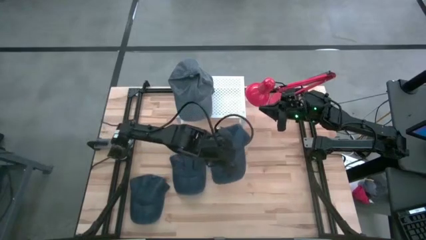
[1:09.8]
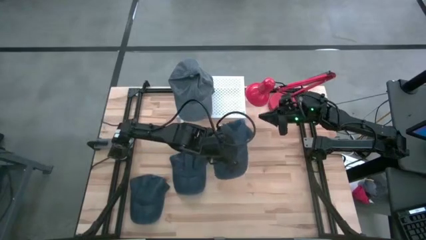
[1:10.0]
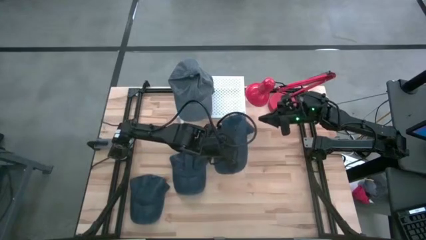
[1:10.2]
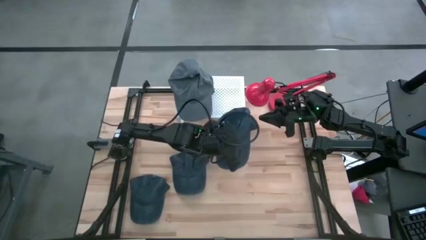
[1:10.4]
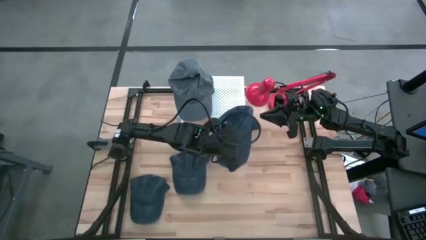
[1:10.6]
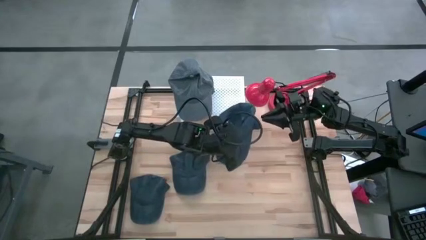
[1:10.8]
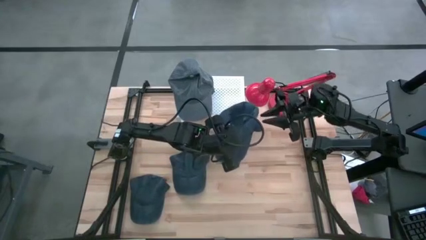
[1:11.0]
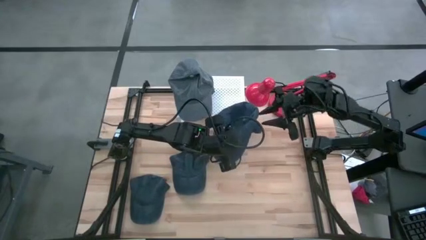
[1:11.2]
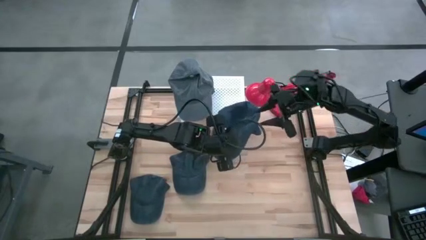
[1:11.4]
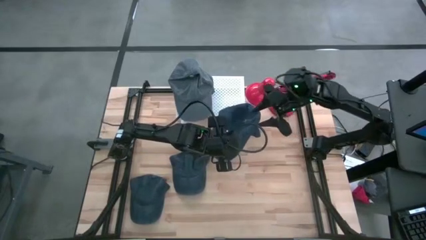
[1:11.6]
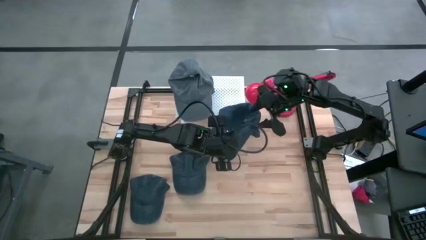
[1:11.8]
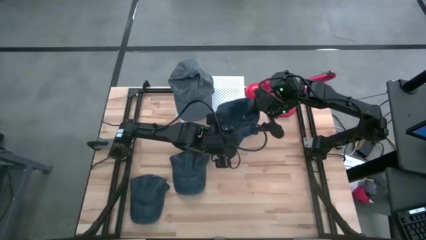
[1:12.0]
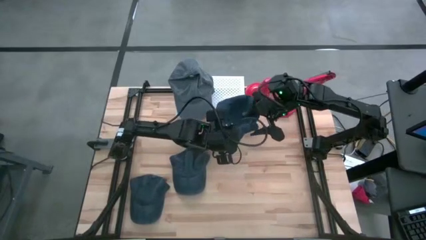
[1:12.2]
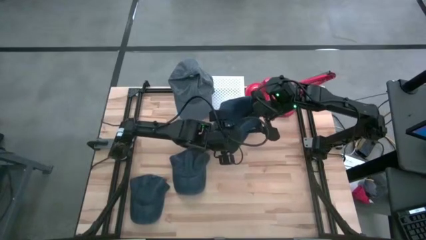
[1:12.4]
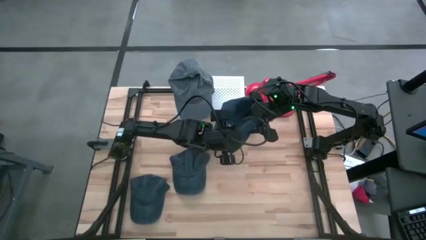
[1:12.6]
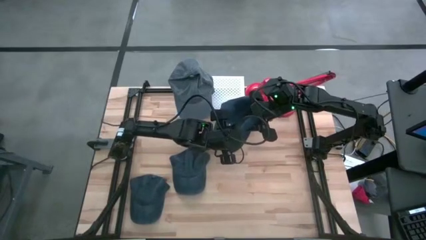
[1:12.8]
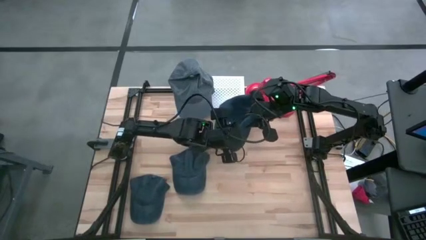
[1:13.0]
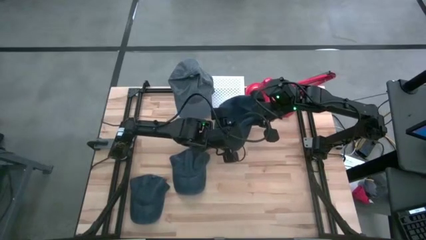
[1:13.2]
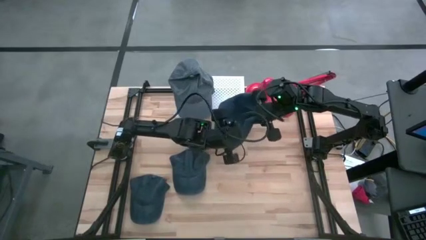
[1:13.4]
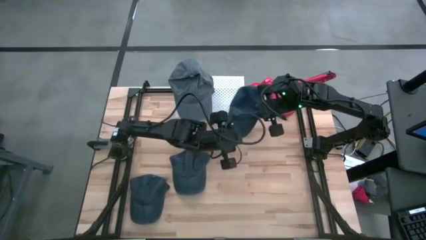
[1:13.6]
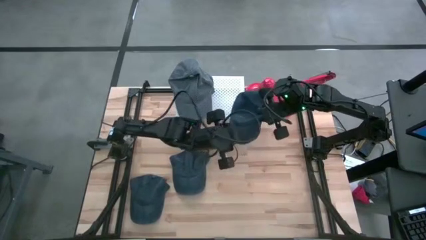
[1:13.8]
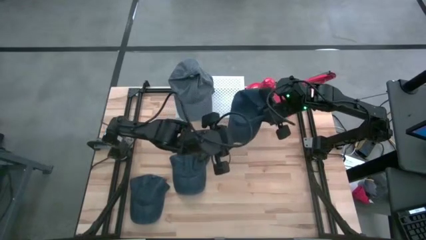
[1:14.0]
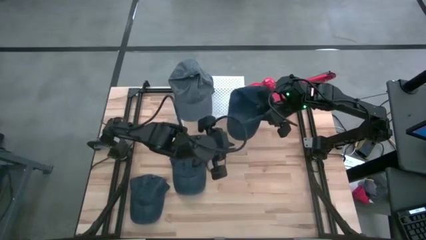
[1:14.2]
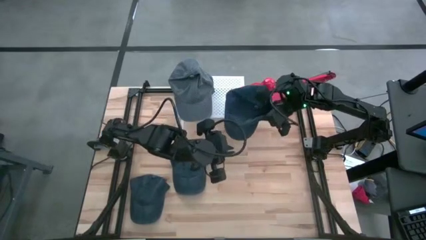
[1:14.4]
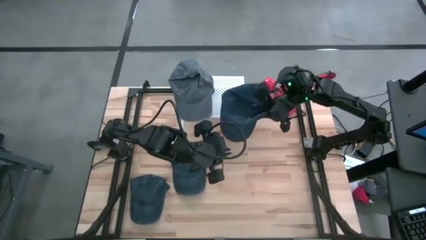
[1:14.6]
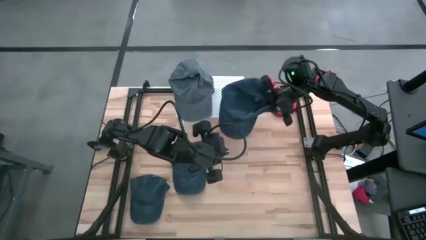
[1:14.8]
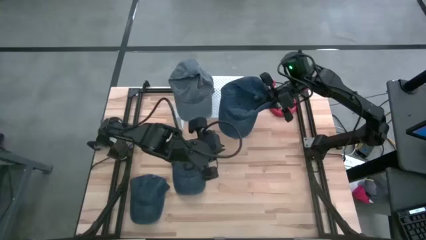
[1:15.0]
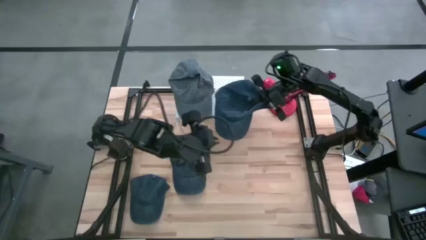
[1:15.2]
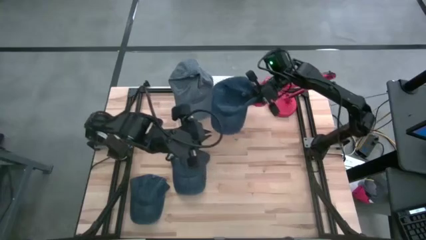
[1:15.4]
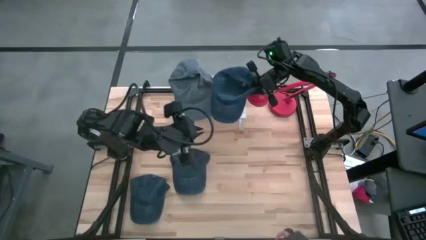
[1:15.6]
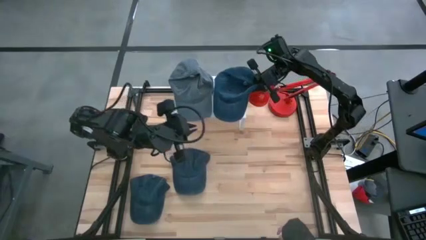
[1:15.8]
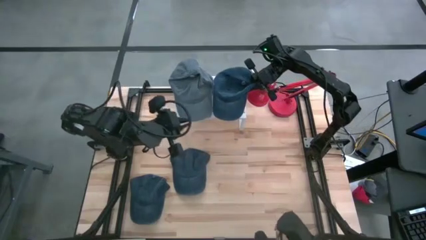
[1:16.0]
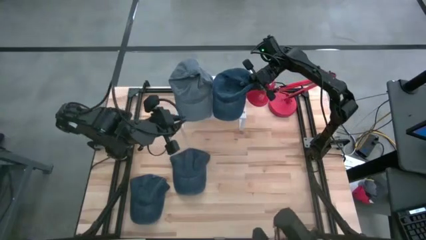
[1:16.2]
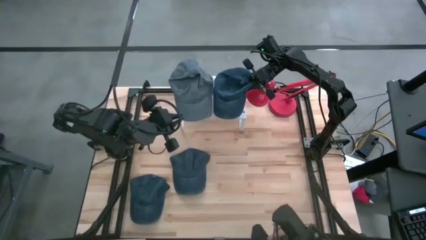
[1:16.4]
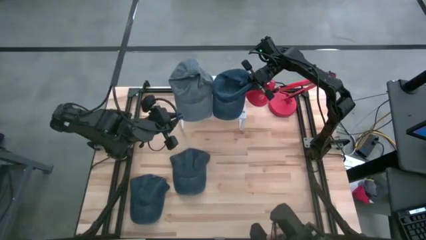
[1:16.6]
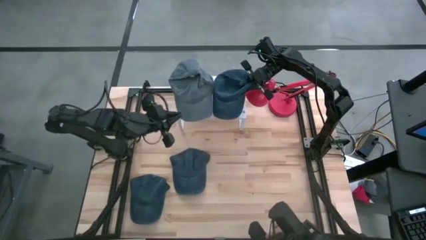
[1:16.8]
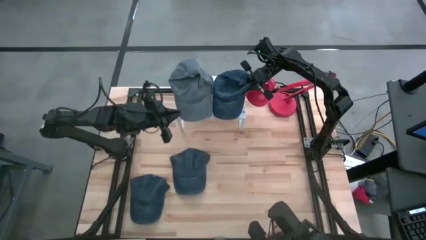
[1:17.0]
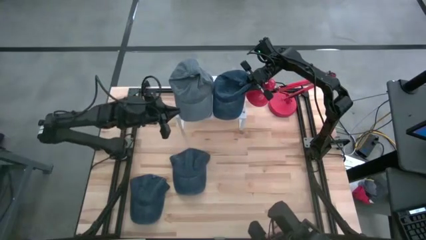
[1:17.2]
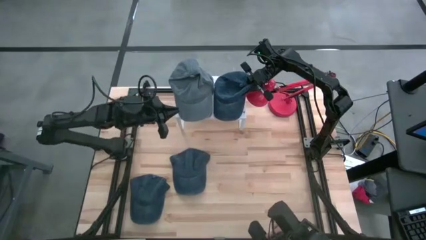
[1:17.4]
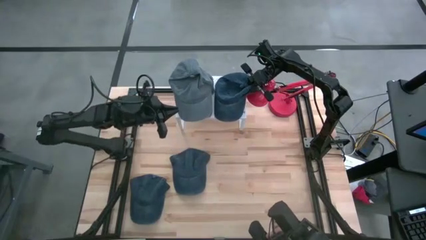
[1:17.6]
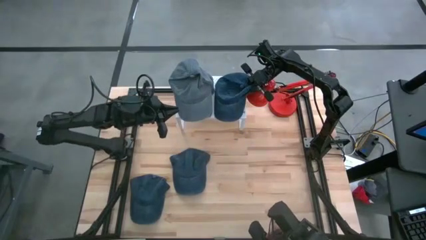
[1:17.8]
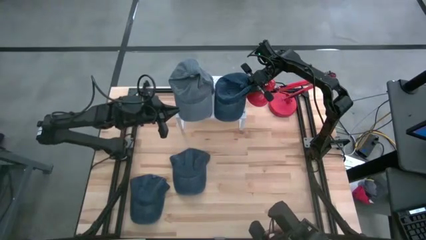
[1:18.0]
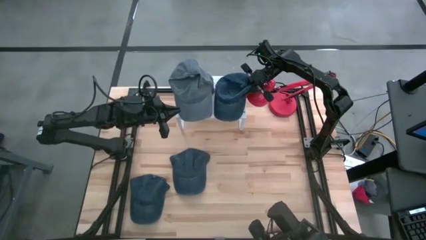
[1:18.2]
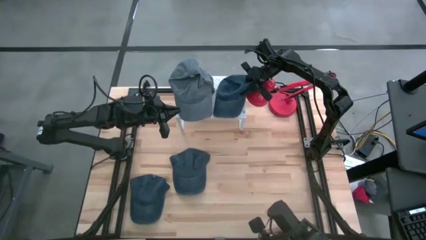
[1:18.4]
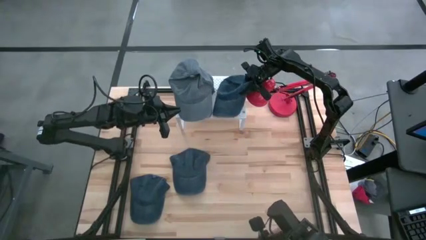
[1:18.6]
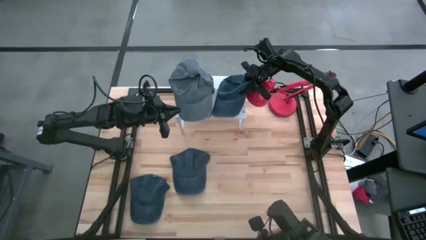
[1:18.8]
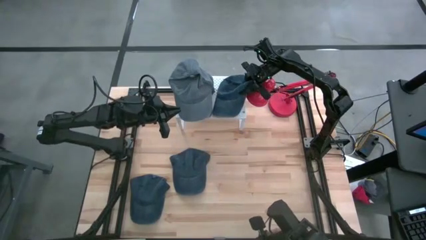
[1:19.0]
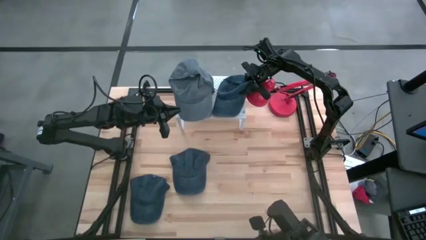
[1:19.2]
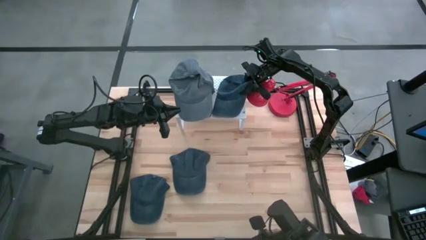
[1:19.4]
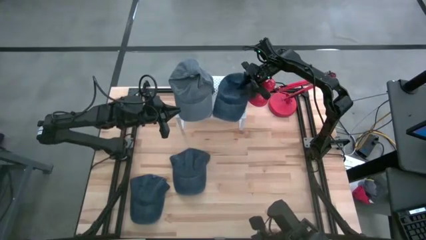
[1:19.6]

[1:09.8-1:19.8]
Task: Pick & Place hat
Put the top blue cap on the shelf
